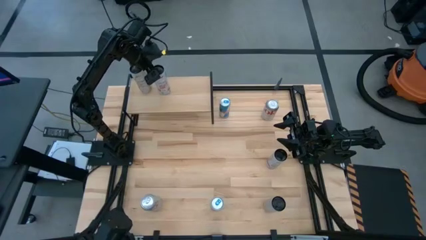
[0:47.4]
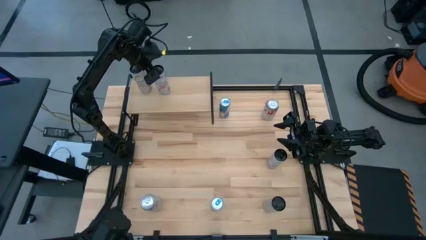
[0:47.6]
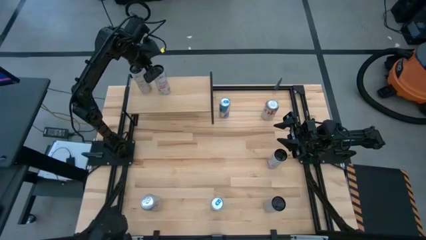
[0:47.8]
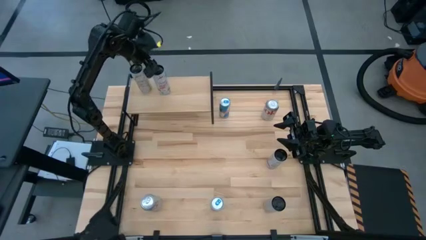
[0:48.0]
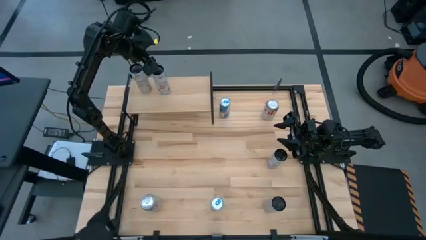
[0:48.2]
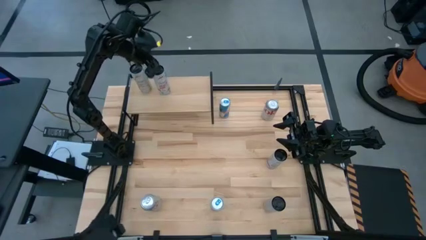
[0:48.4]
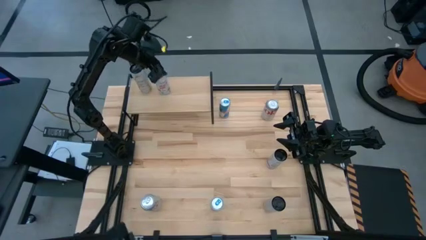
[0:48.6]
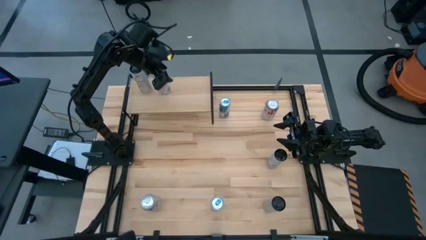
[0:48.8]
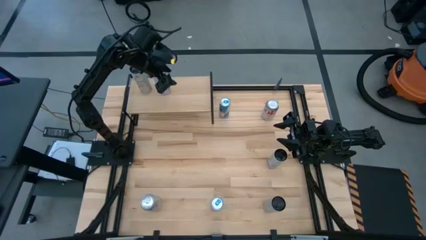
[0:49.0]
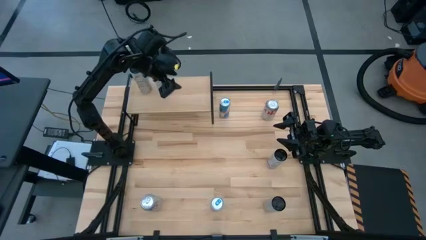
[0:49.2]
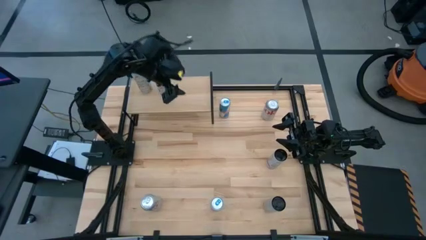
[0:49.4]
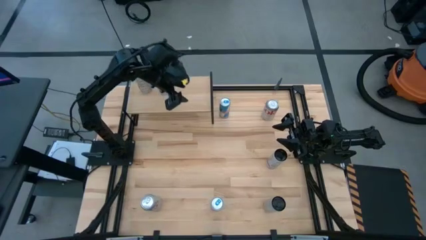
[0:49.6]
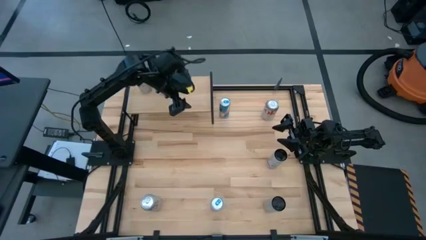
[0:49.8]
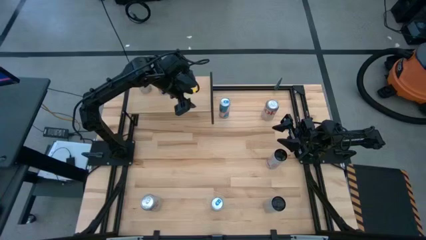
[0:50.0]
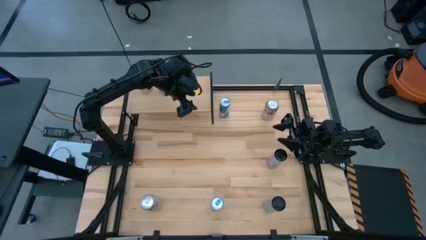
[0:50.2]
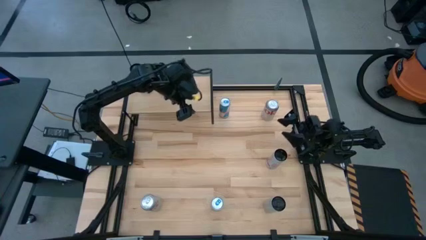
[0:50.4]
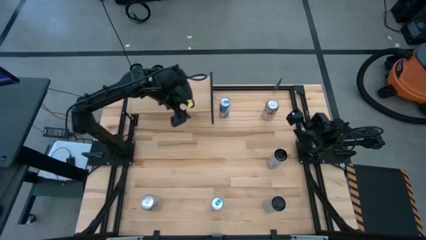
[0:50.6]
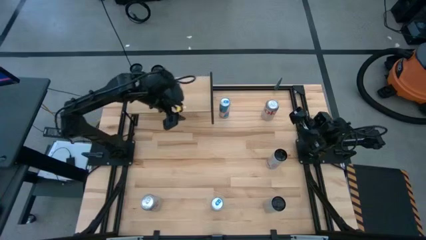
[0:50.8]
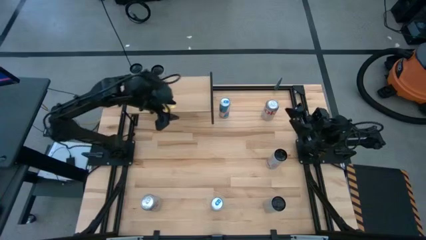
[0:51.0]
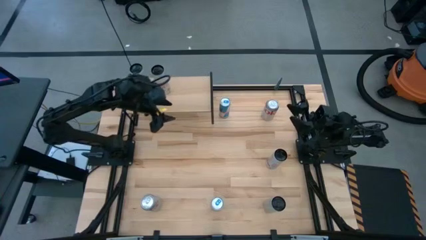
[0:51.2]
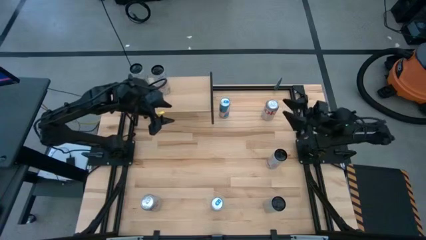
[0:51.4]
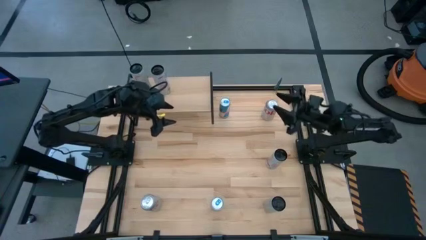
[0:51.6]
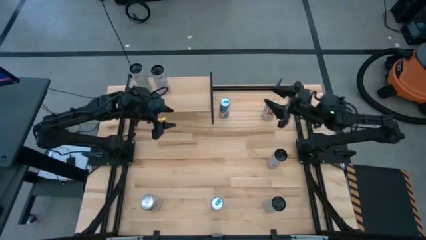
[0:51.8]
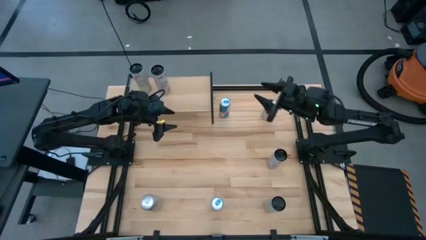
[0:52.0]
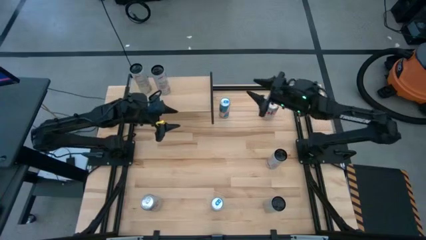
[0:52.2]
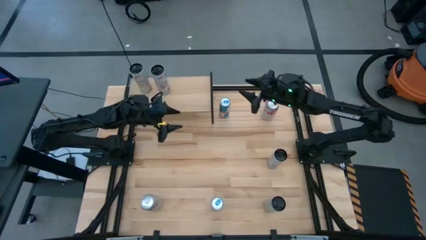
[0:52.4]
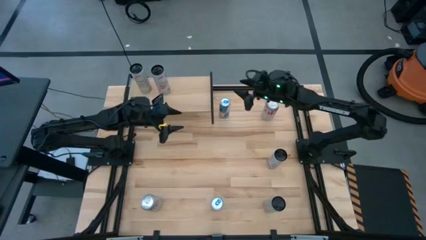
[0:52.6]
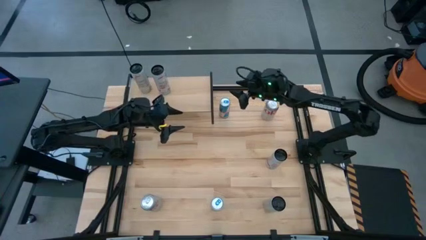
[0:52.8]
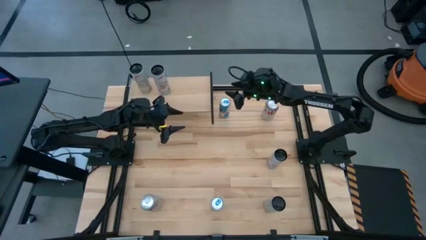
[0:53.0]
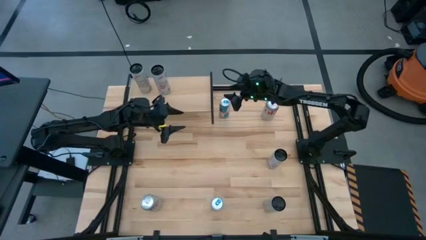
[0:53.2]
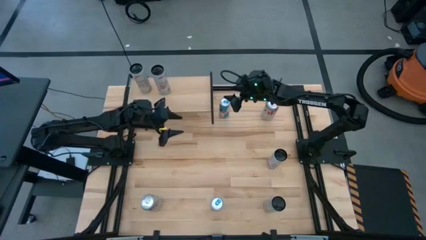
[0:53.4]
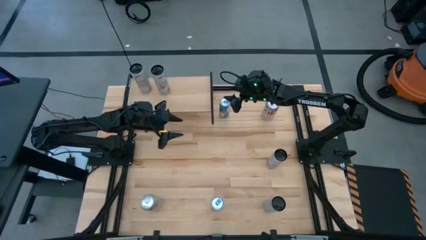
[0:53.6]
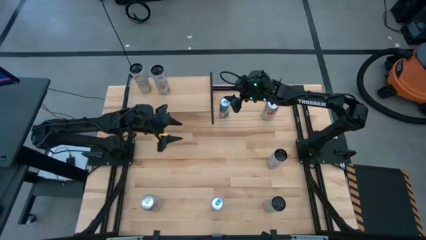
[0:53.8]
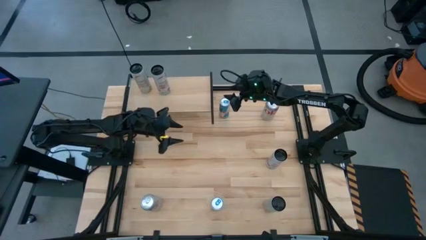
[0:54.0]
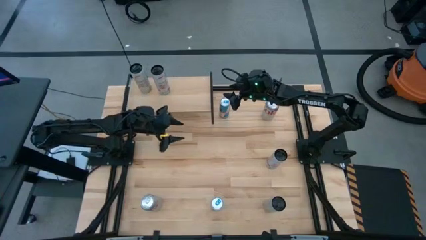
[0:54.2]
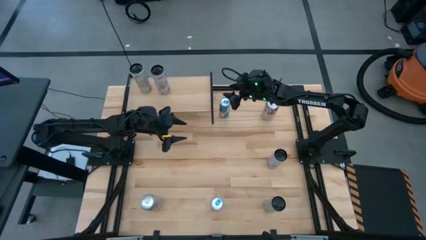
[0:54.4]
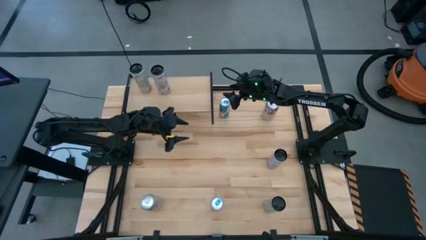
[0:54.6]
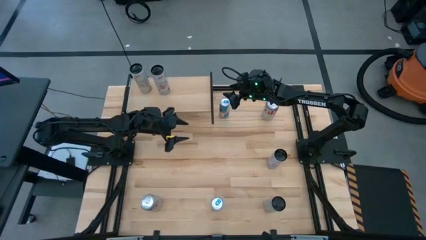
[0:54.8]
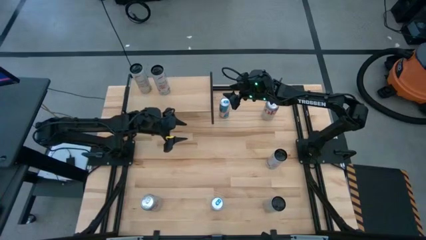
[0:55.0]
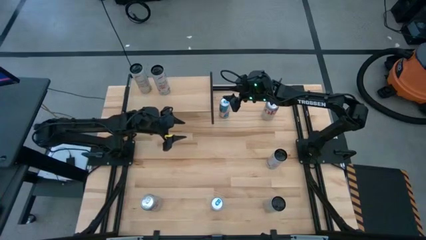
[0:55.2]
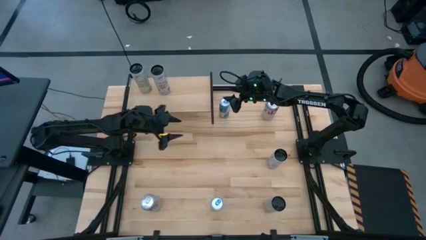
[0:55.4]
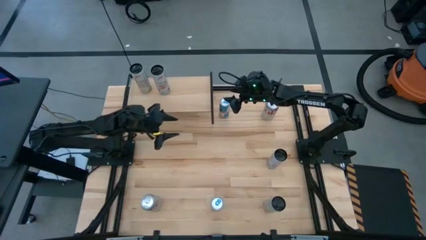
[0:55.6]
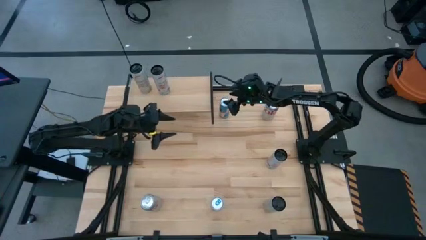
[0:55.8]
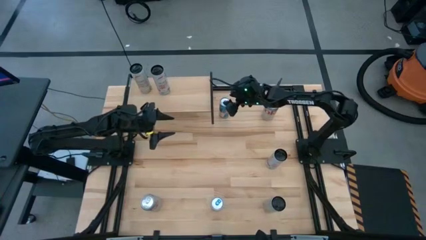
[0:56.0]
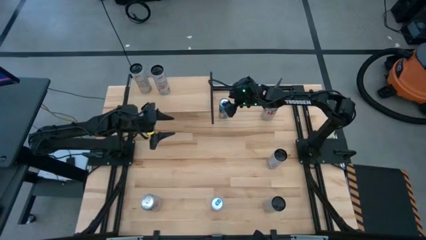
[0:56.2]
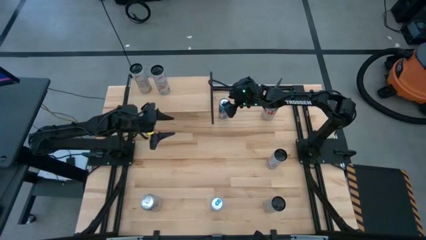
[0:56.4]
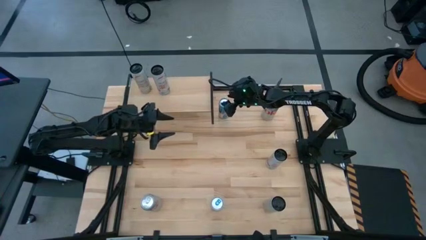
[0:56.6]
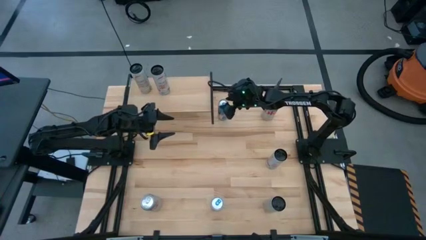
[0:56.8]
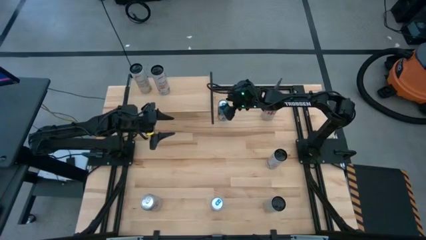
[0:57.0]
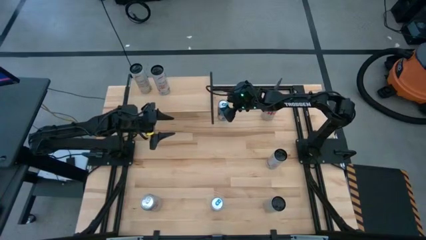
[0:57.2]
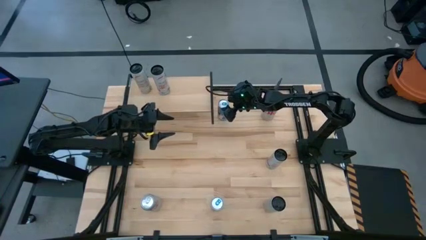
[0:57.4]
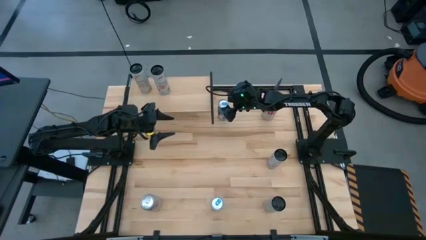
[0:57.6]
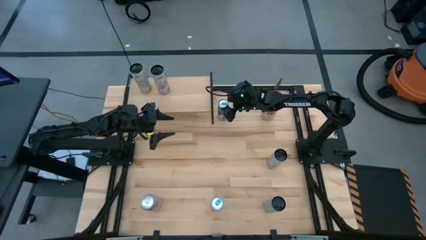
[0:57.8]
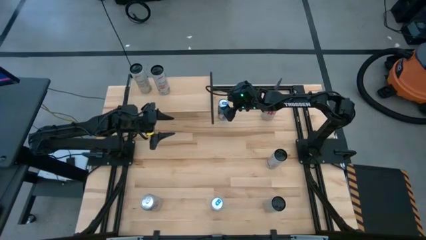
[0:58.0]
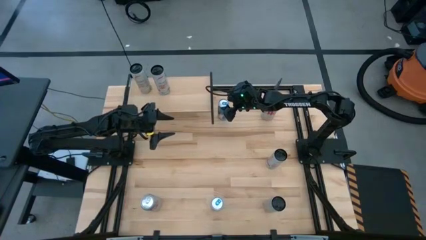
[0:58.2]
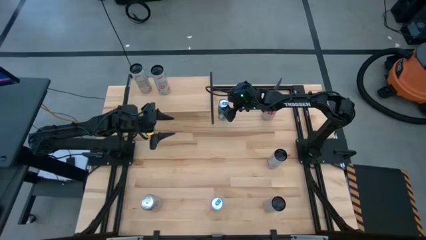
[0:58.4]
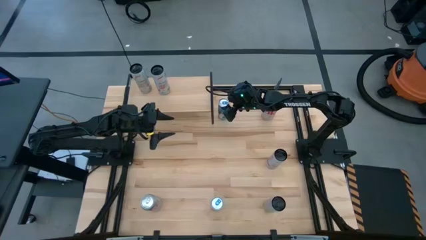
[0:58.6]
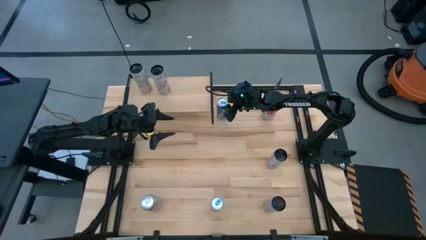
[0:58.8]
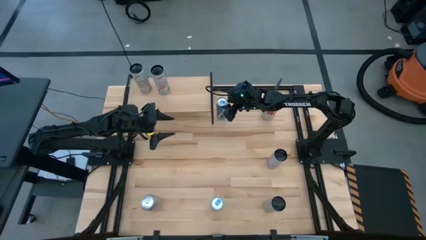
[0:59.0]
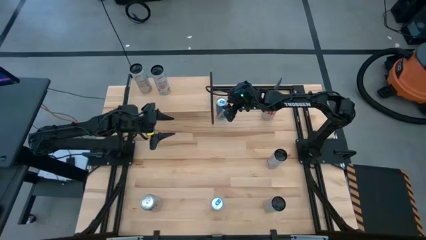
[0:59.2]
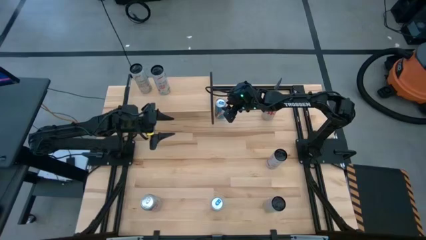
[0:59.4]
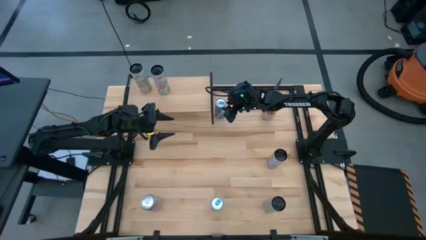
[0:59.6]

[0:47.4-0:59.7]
Task: Place canned beverage on shelf
Put the top blue soda can on the shelf
